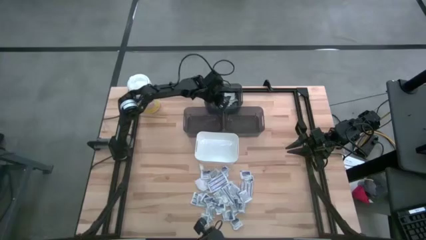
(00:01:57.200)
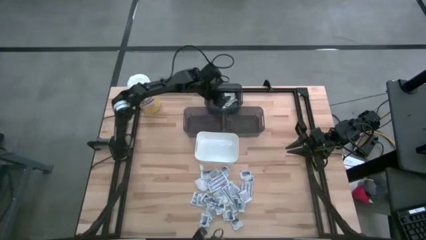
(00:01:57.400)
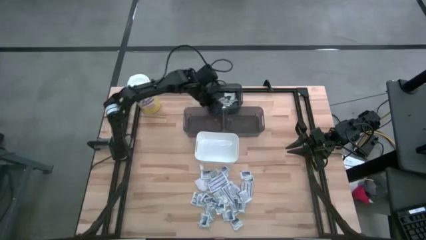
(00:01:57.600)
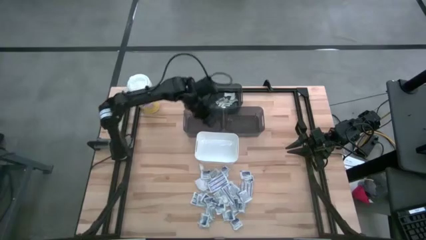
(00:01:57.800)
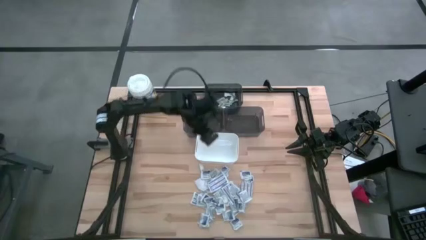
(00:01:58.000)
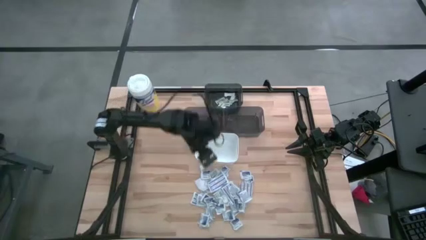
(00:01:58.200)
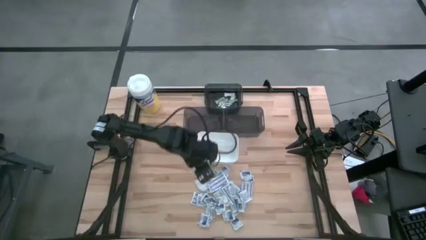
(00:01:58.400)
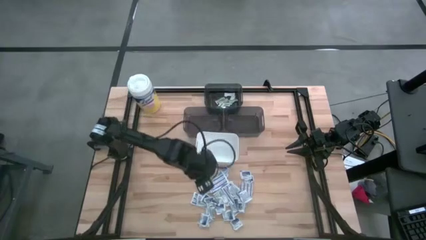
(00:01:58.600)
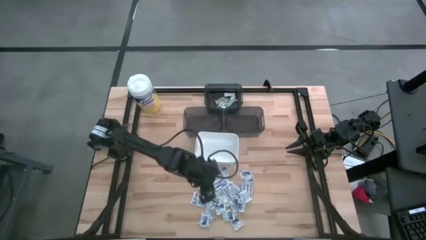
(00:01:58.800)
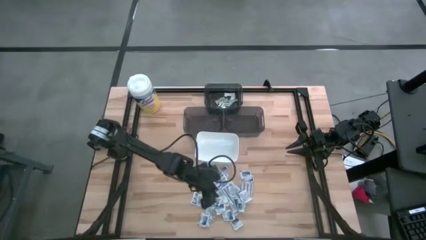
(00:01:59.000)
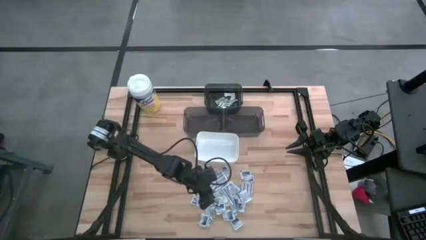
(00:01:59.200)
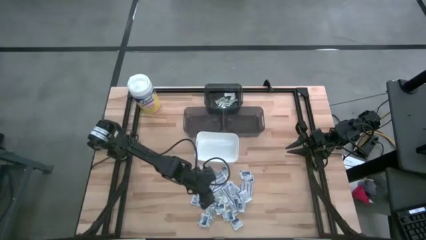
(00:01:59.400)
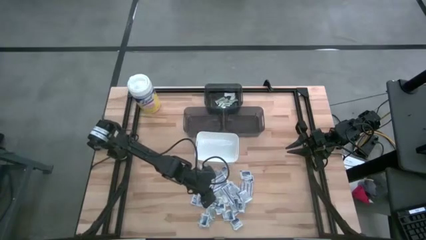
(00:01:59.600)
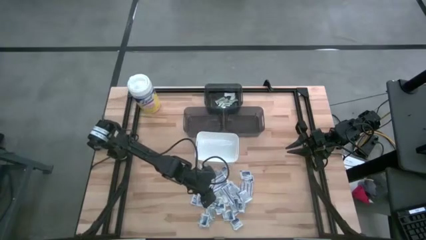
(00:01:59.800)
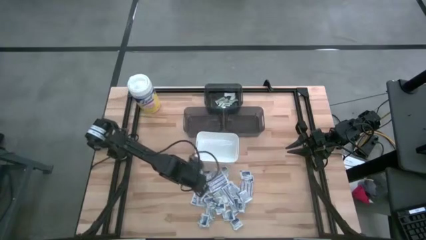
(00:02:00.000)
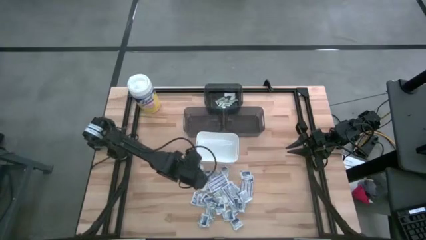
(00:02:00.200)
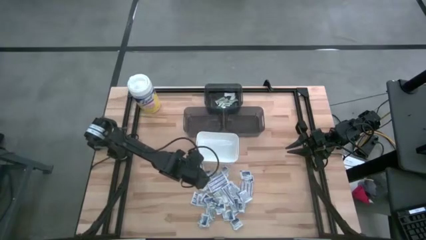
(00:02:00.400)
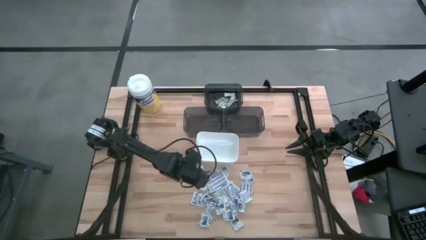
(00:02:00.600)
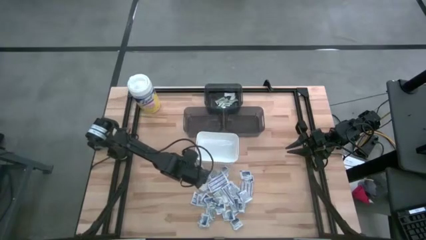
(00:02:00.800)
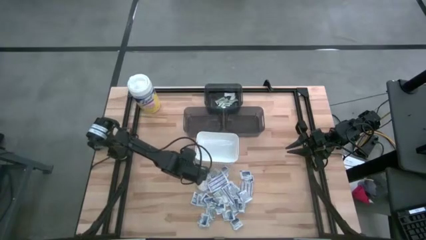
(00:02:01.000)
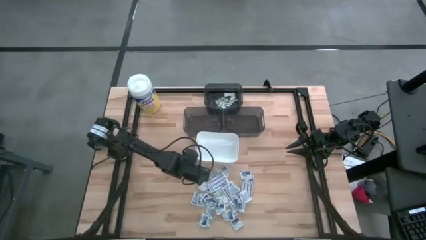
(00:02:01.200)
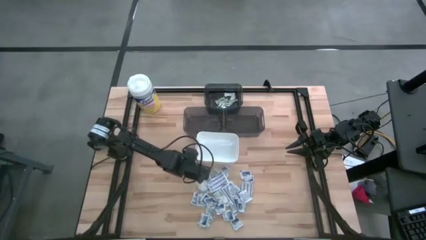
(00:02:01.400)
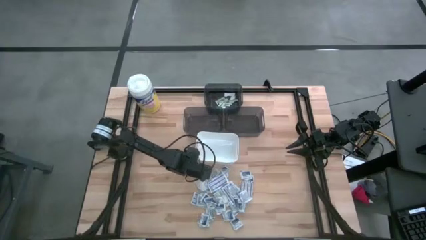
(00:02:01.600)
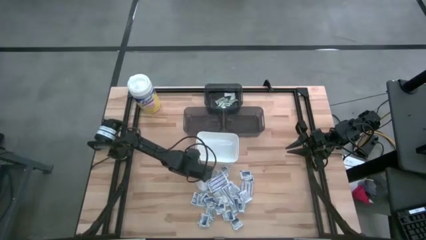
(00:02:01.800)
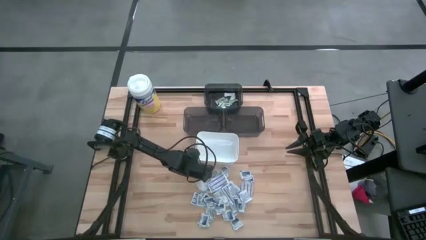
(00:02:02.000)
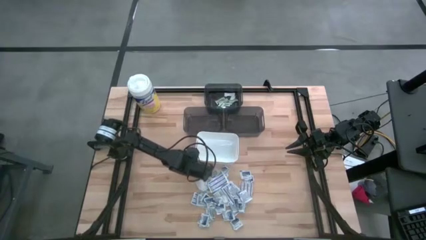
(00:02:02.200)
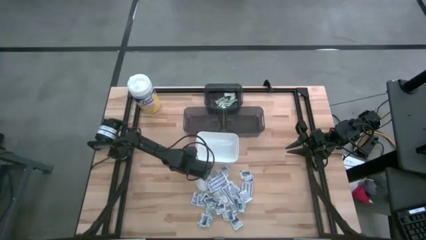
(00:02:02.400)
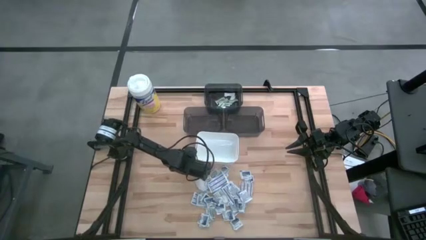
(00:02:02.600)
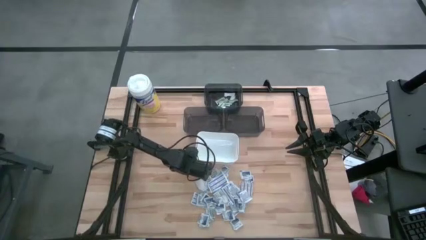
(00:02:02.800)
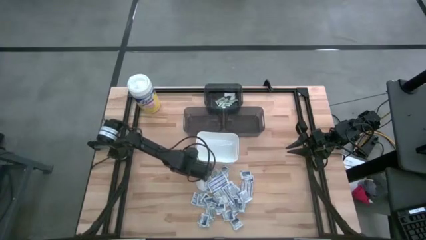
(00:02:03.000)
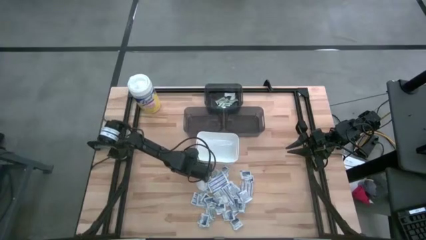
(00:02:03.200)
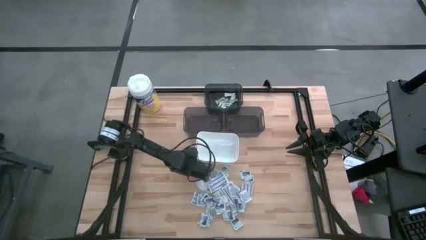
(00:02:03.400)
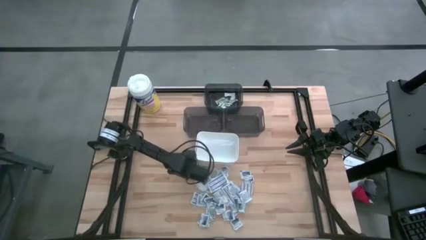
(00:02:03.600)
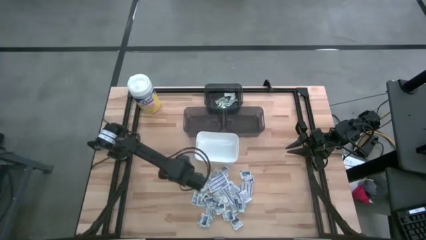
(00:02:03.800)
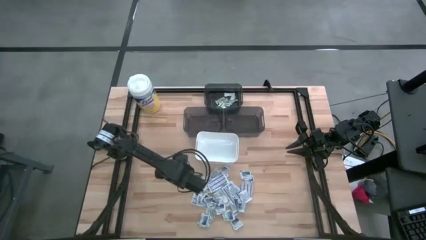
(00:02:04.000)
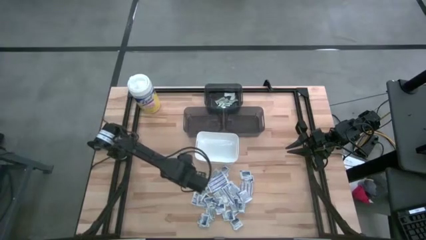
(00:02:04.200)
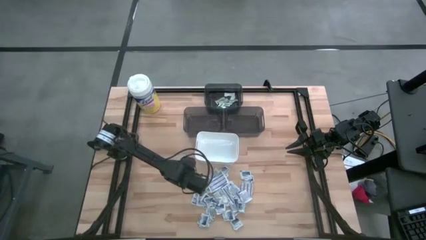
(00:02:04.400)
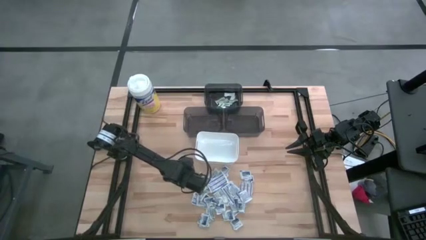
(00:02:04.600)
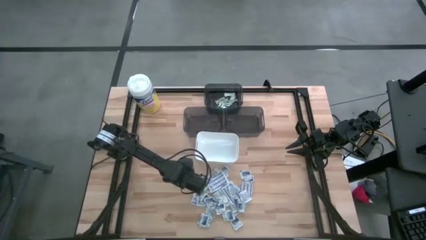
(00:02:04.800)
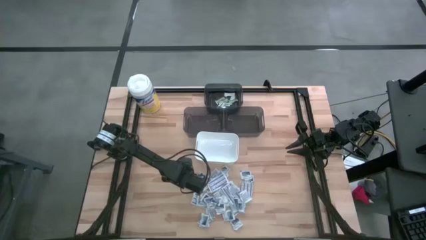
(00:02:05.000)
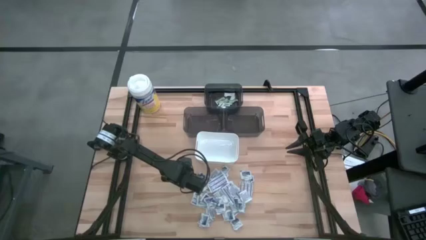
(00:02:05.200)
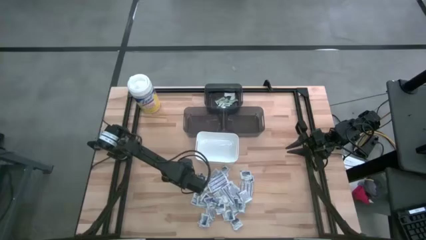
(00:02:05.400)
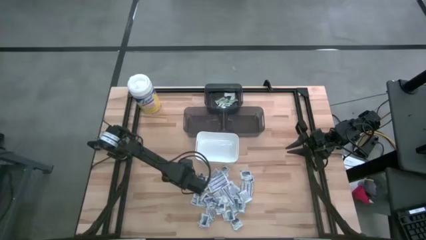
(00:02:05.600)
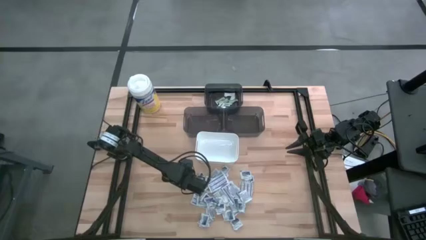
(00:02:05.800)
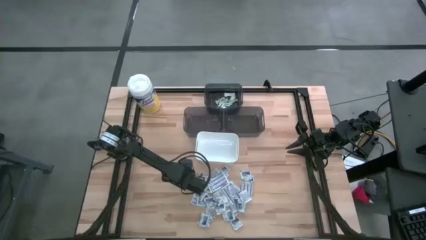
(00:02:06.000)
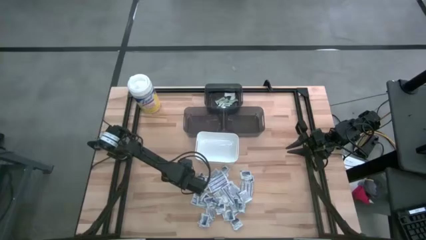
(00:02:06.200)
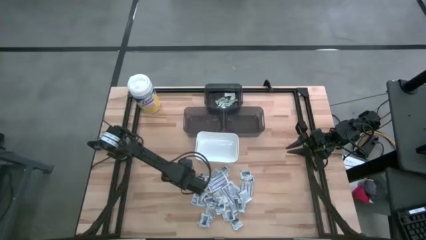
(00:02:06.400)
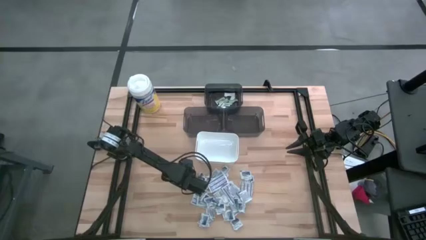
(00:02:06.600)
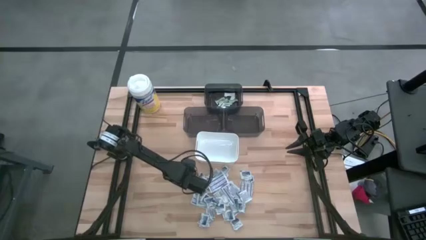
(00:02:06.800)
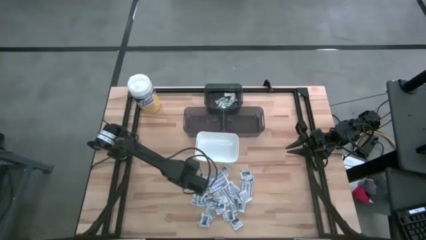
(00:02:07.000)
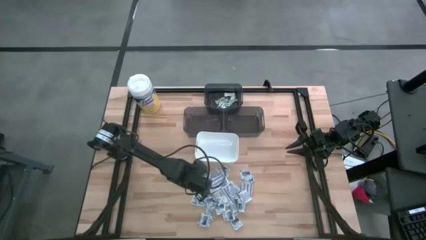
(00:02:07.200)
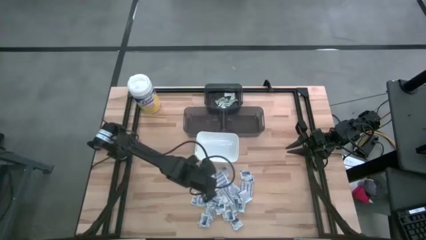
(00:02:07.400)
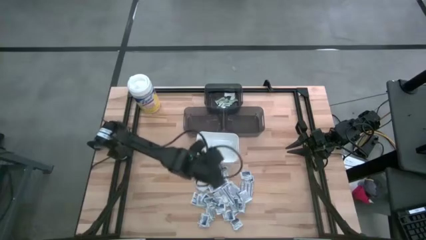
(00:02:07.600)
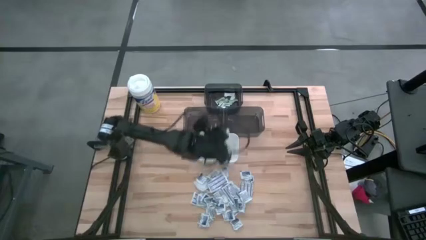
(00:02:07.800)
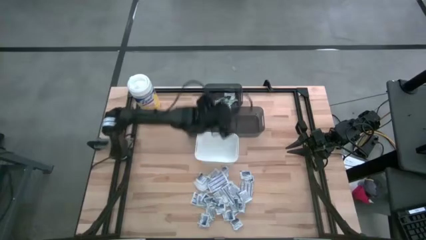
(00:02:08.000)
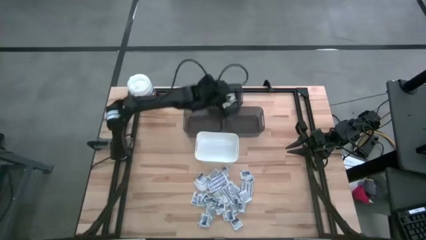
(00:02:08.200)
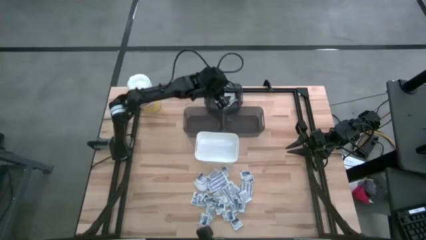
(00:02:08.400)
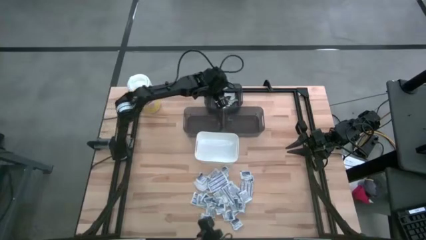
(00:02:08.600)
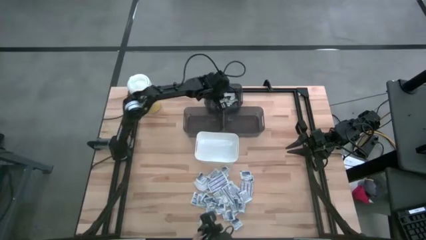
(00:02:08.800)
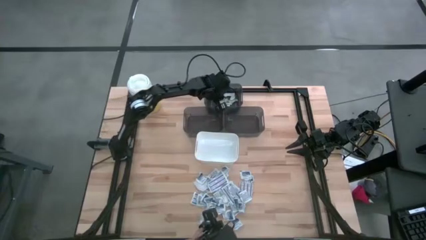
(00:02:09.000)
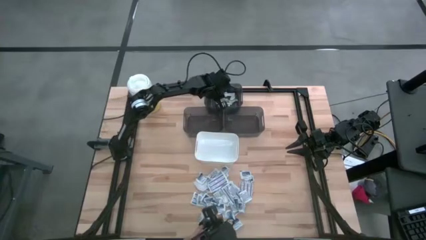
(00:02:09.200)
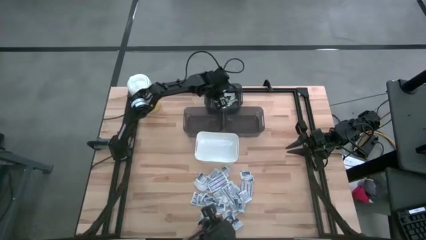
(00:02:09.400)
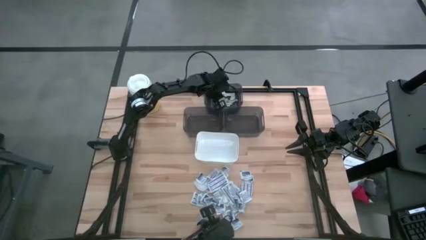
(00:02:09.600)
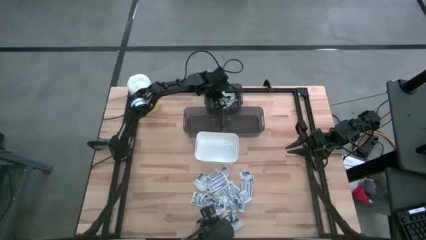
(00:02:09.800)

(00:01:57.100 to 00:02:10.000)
Task: Pick & Place First Aid Supplies
Put the green bandage into the top black bin

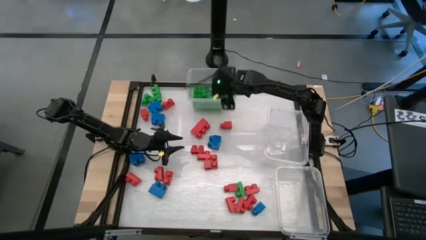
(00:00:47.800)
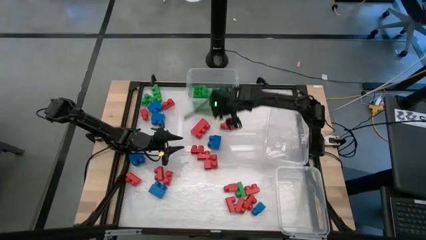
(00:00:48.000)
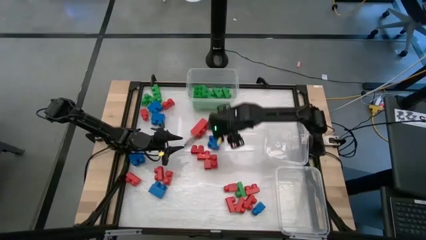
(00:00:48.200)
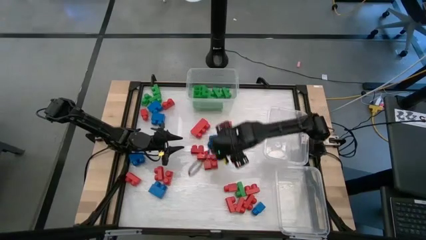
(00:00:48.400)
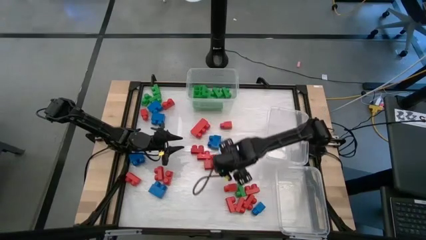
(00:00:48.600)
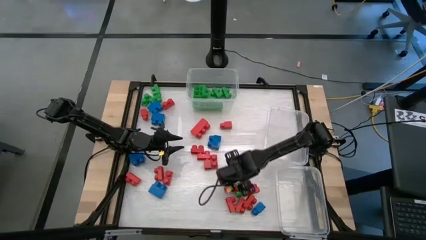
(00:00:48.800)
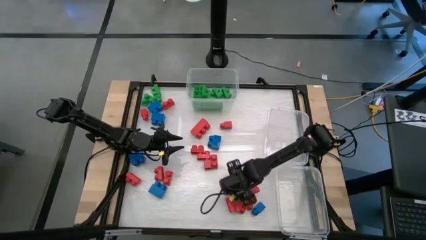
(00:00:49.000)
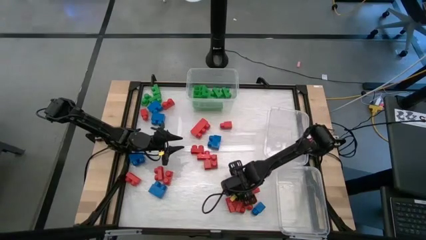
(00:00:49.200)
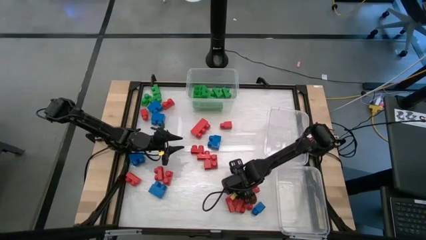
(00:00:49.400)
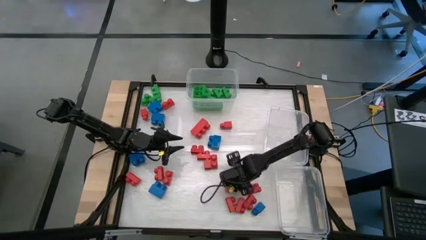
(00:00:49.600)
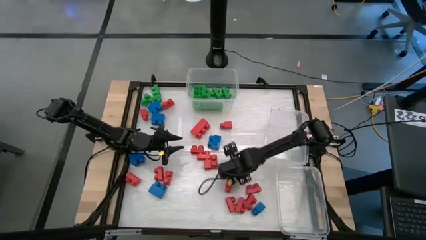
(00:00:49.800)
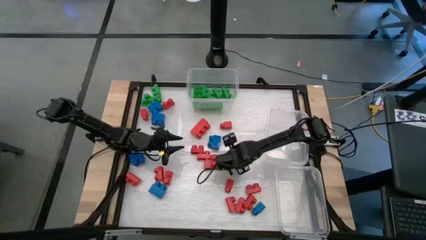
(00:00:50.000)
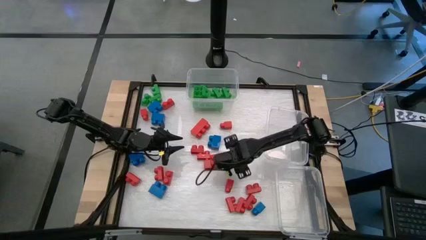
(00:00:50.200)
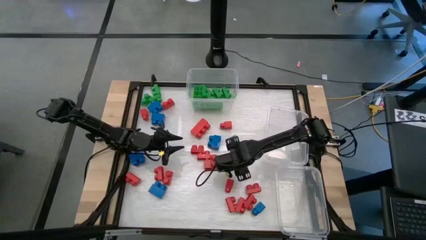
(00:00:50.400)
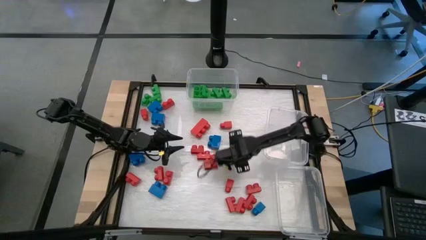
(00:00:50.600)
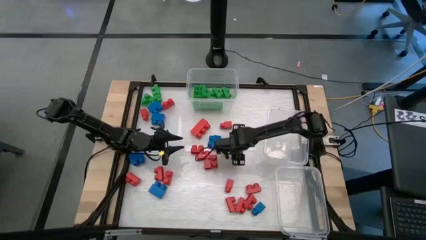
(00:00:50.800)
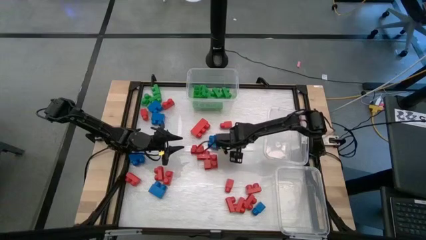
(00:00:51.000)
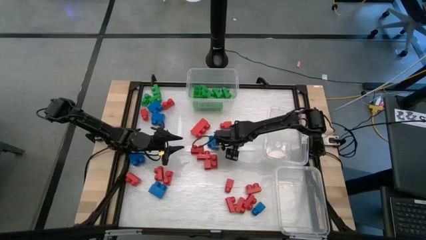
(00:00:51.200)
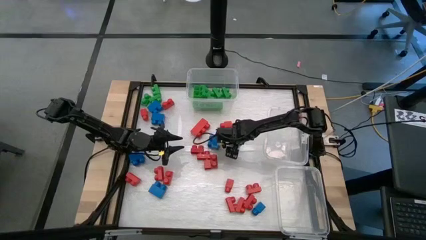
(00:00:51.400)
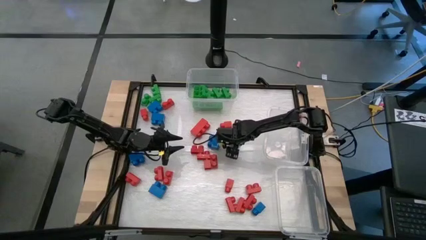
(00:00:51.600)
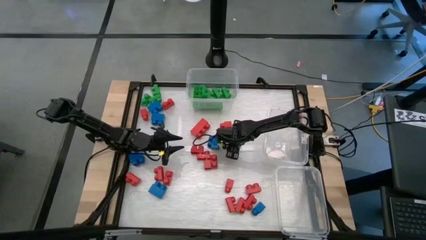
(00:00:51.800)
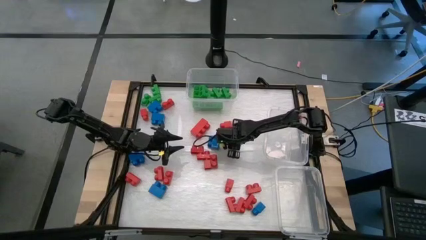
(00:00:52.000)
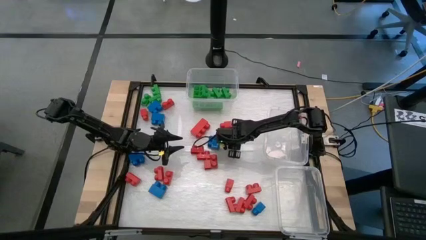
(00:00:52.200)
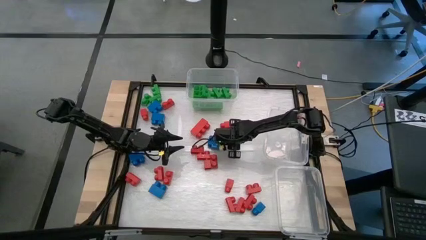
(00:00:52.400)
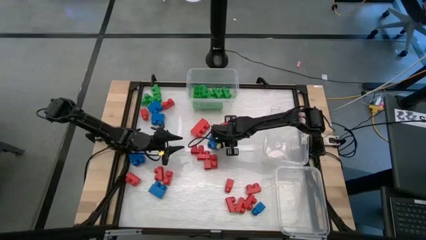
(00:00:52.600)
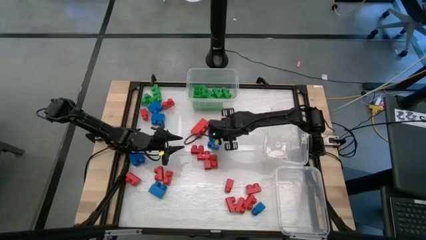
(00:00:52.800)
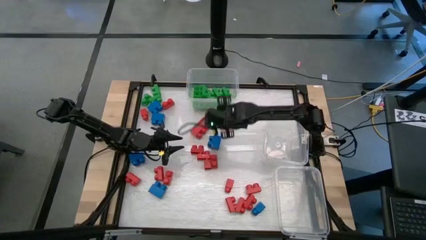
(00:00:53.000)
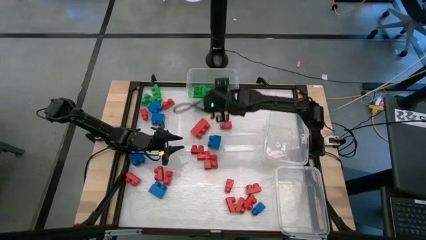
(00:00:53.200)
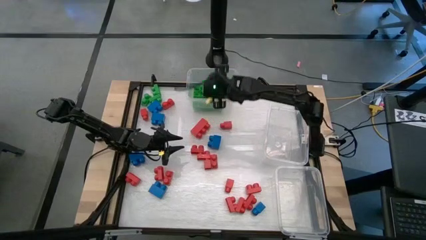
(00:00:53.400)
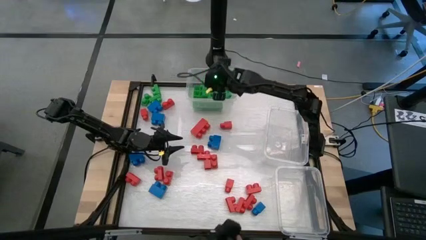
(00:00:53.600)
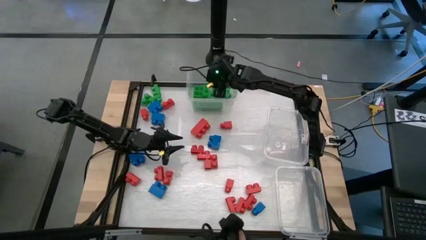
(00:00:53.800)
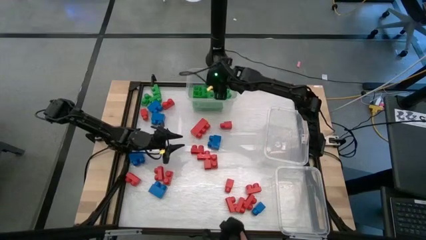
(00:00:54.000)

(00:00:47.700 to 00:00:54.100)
Task: Sort blocks
Put the green game piece into the top transparent bin
